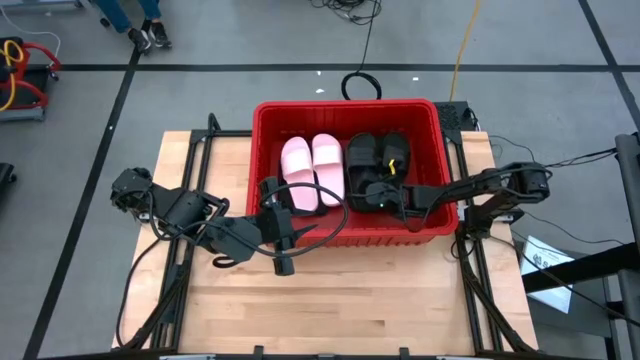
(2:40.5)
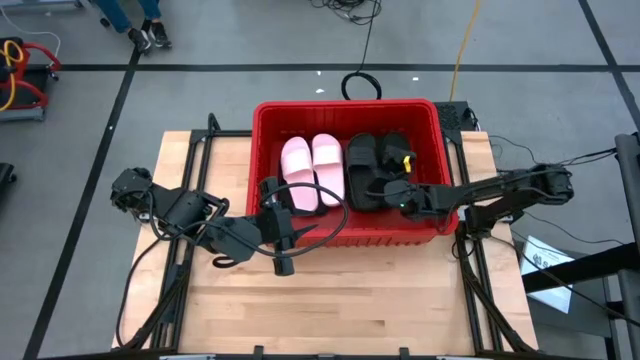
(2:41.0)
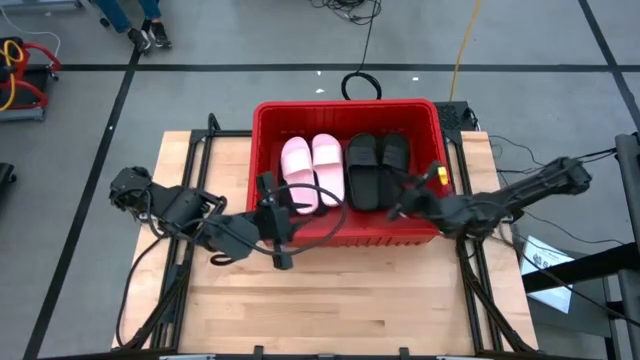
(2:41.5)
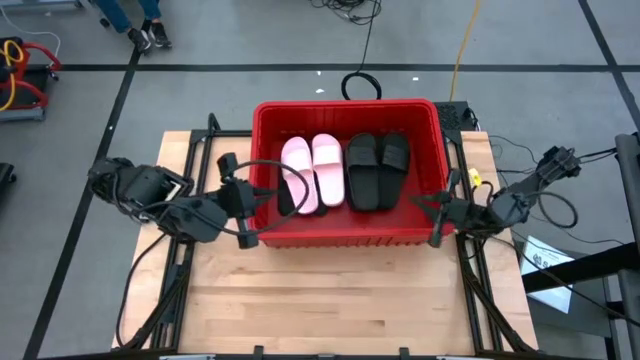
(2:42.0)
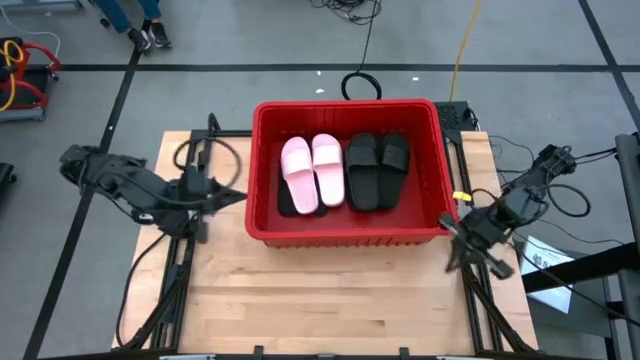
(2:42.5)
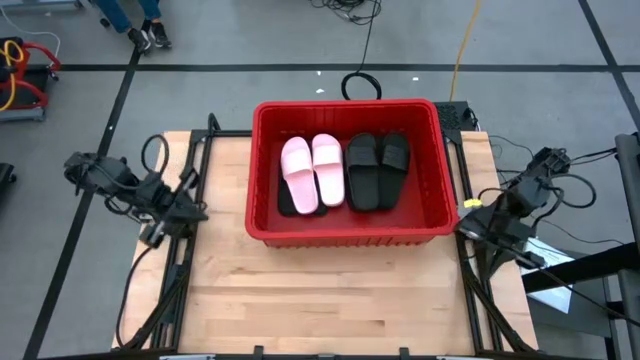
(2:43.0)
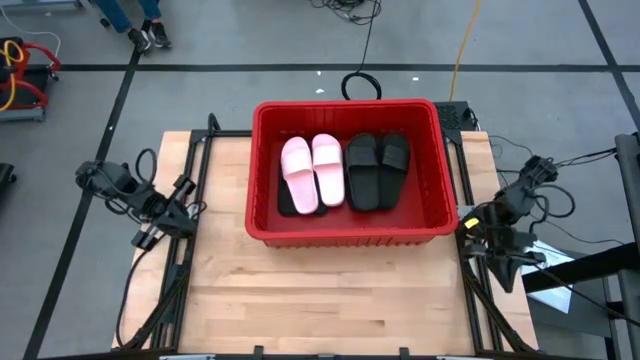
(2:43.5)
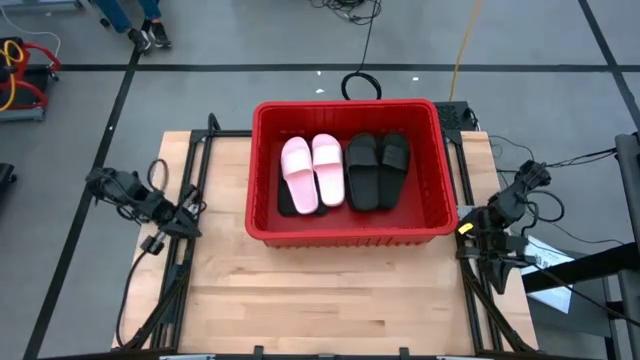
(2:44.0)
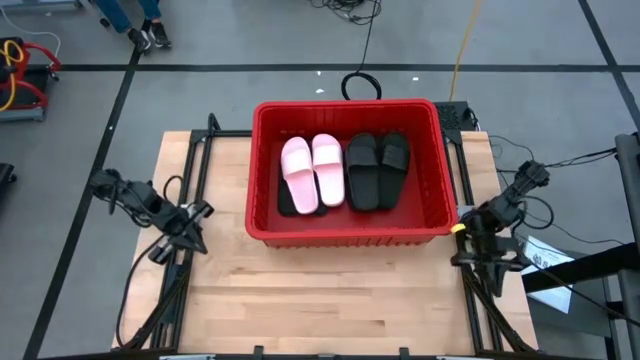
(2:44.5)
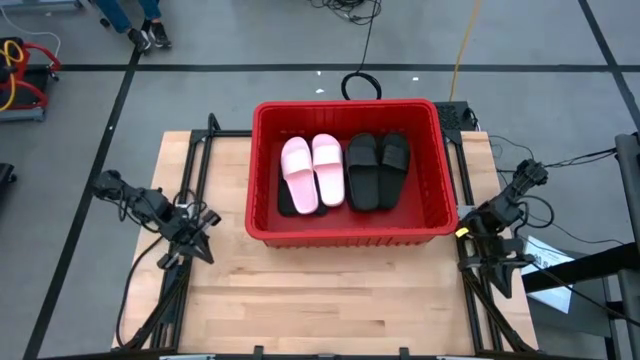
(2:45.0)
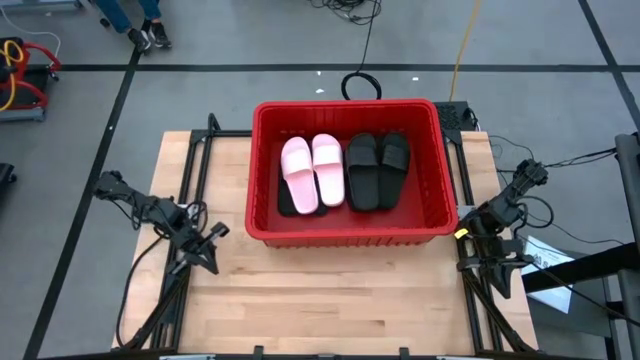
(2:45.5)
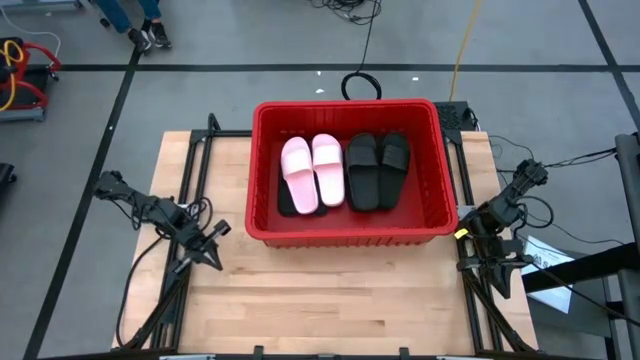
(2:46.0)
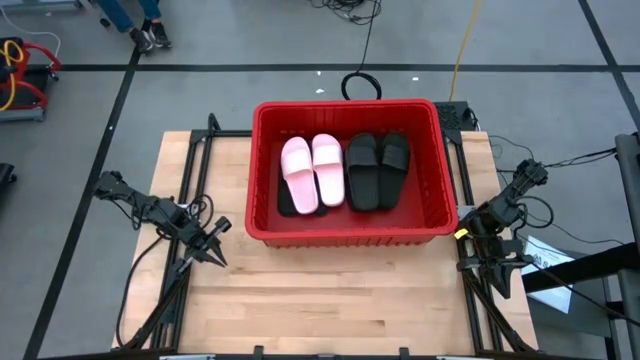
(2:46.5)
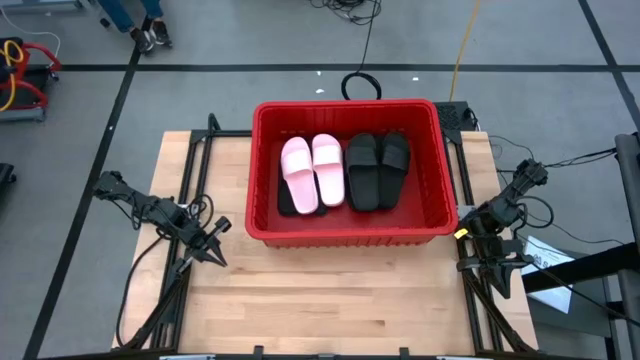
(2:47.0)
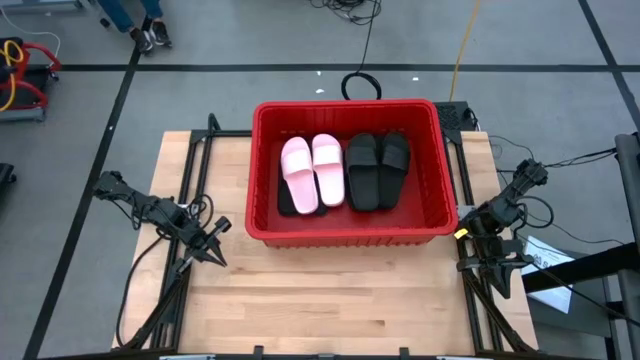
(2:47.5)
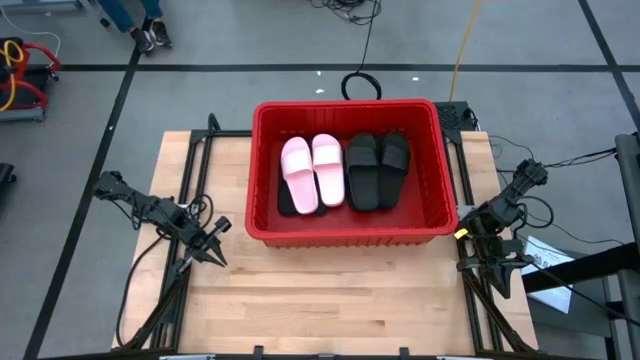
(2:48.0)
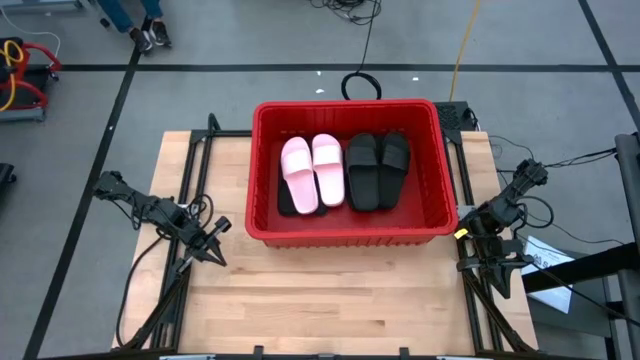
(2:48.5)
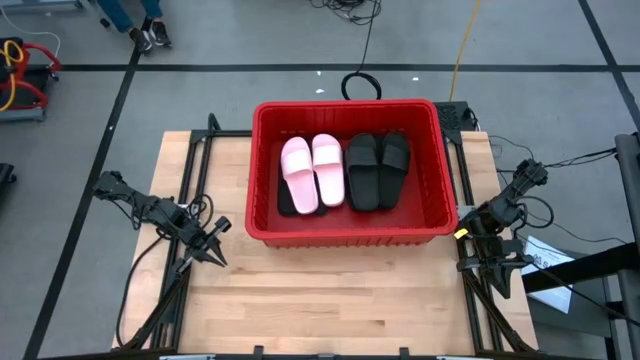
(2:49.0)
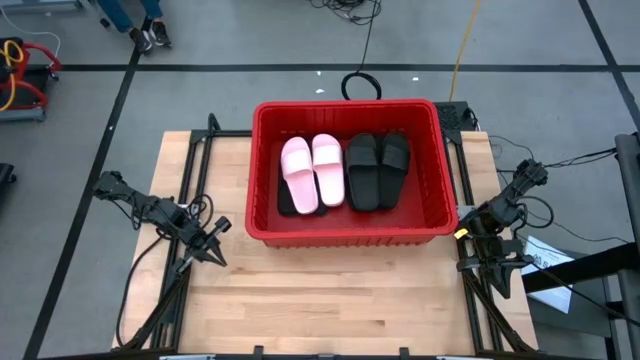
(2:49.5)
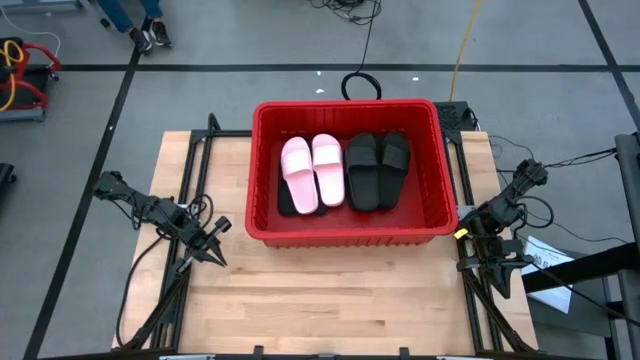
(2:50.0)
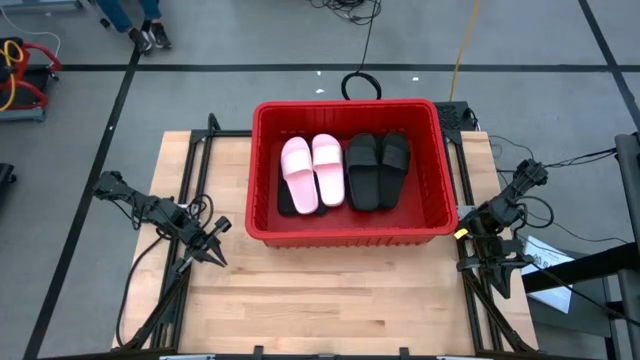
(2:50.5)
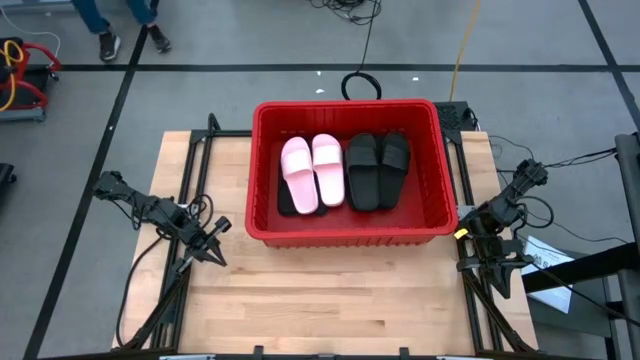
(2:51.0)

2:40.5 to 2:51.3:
Task: Pick and place slides into bin
Return to Home Position

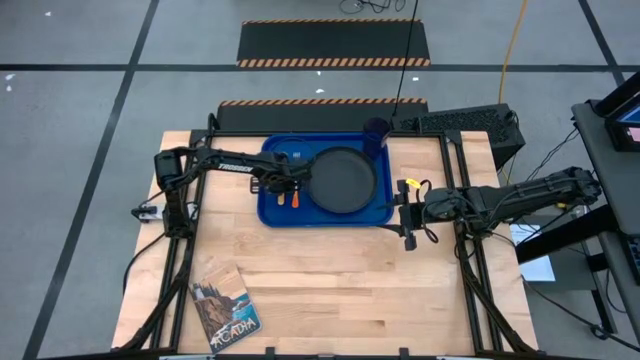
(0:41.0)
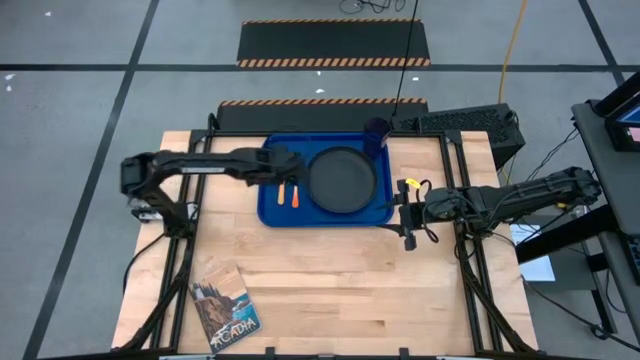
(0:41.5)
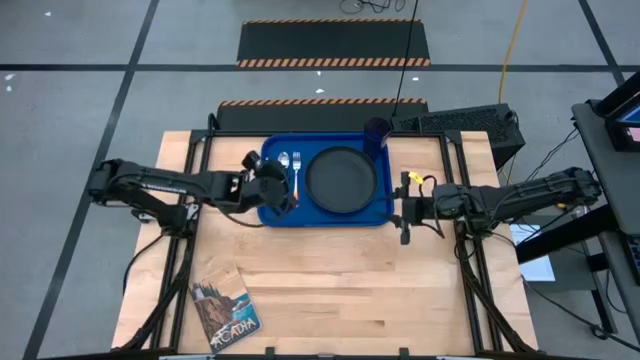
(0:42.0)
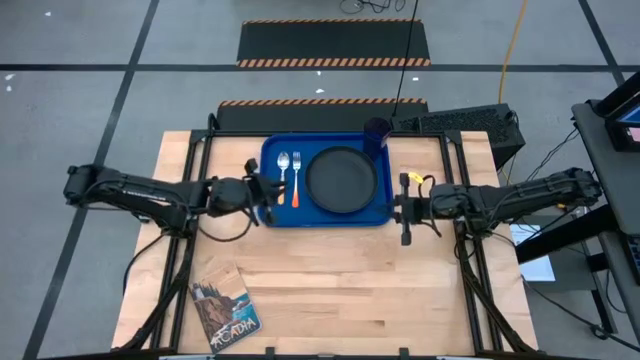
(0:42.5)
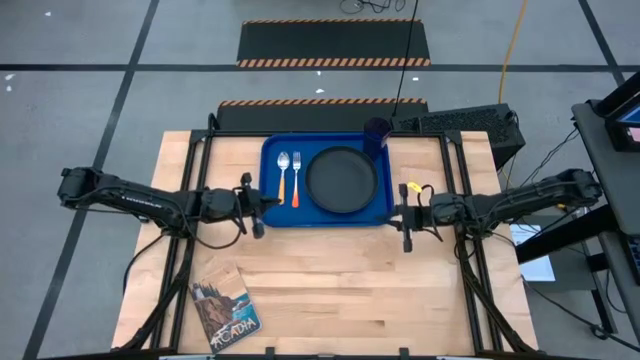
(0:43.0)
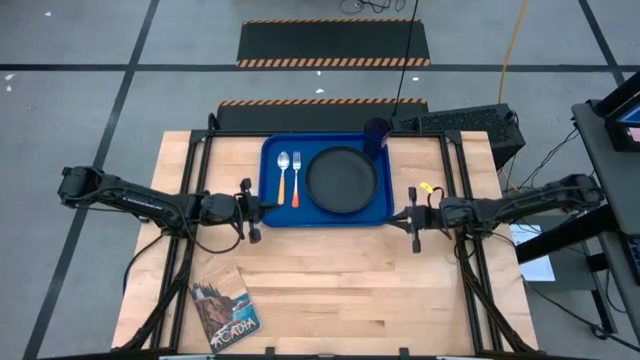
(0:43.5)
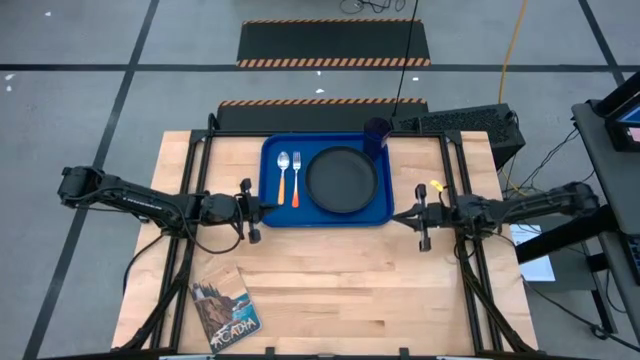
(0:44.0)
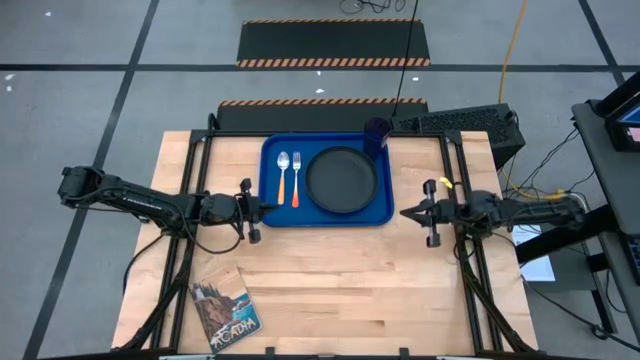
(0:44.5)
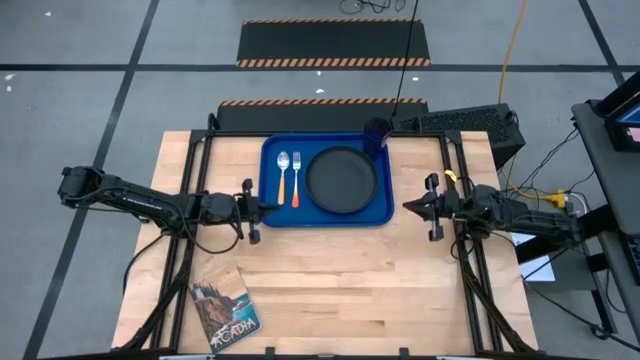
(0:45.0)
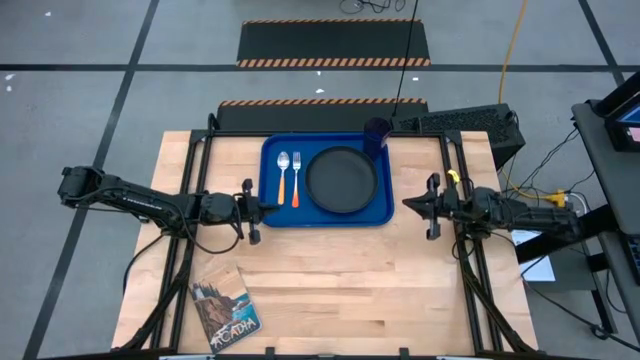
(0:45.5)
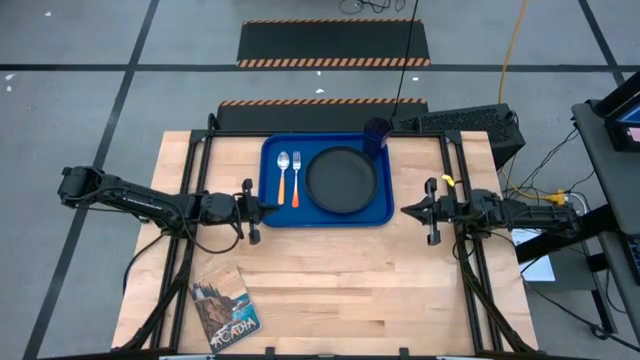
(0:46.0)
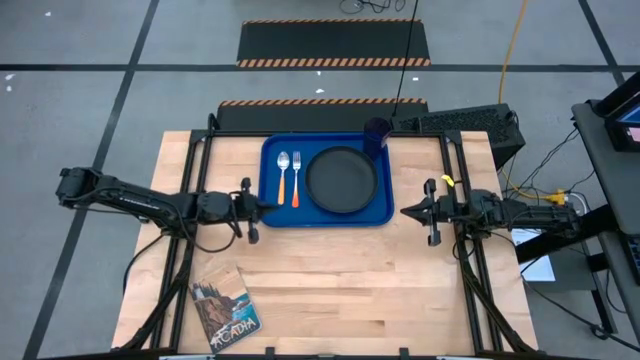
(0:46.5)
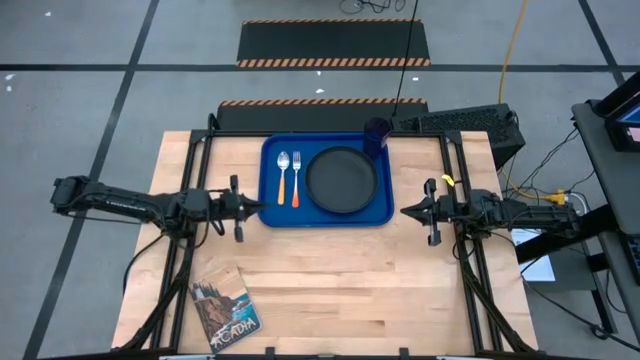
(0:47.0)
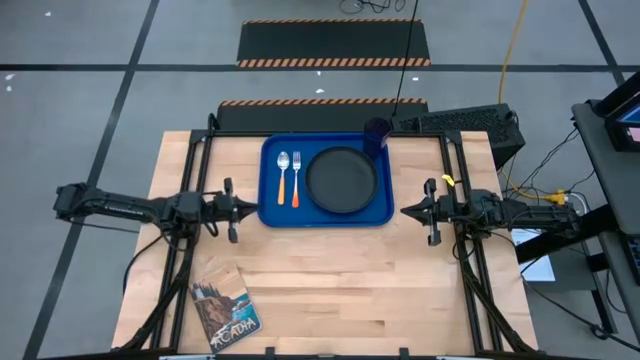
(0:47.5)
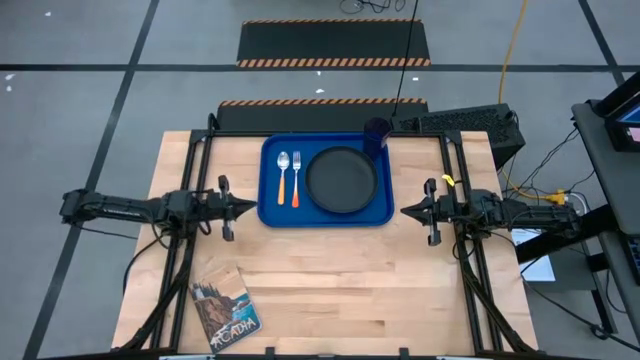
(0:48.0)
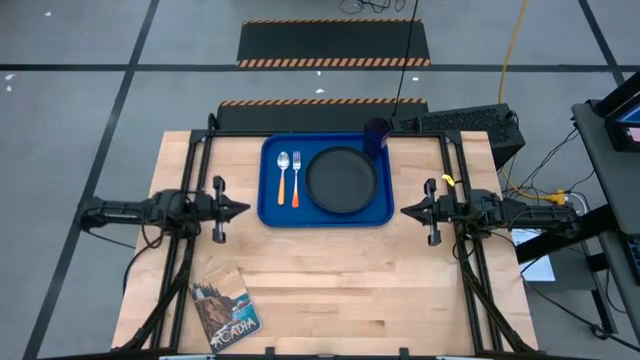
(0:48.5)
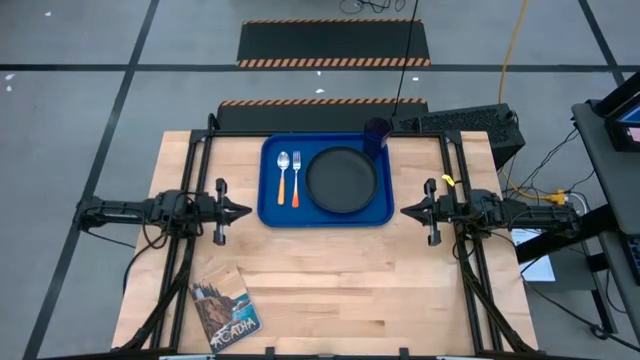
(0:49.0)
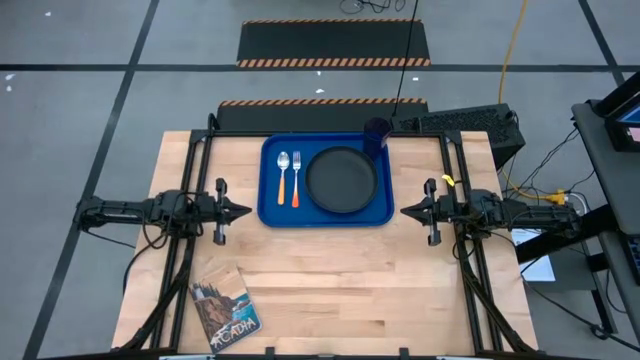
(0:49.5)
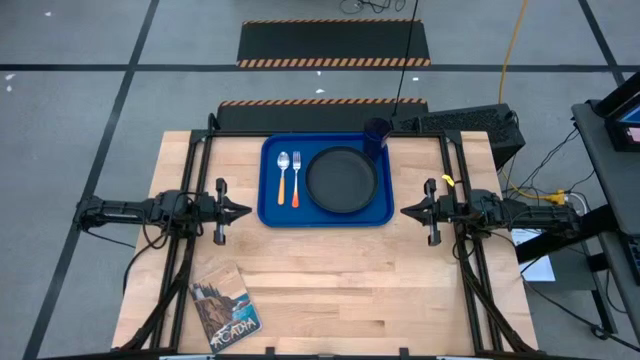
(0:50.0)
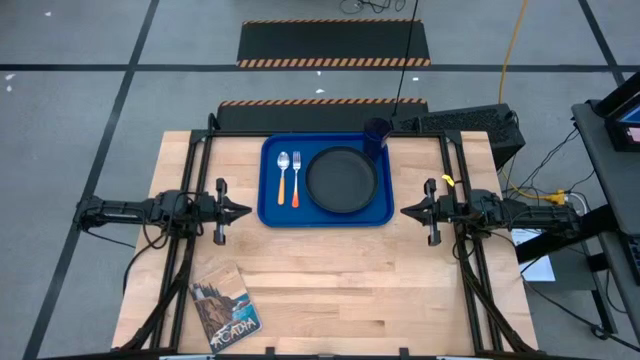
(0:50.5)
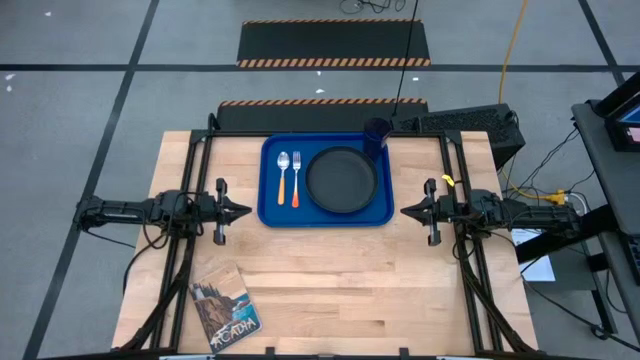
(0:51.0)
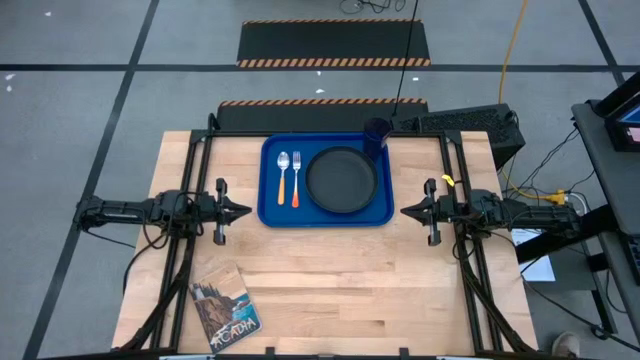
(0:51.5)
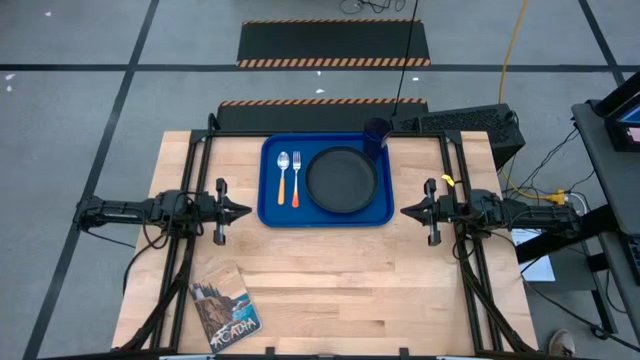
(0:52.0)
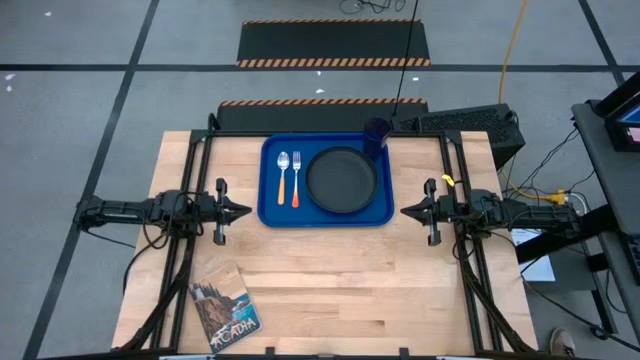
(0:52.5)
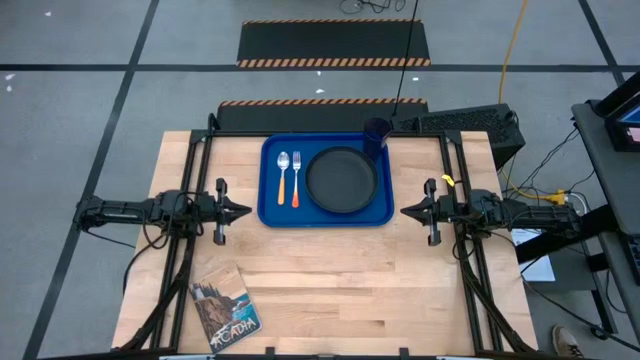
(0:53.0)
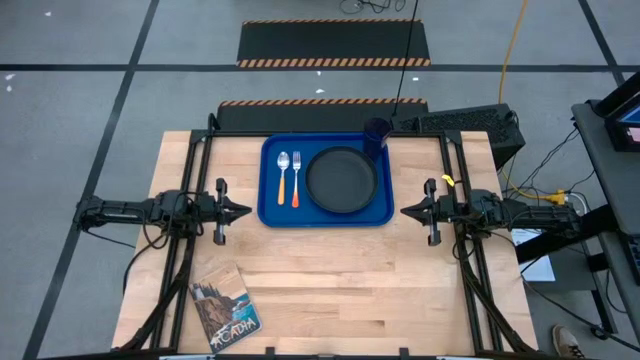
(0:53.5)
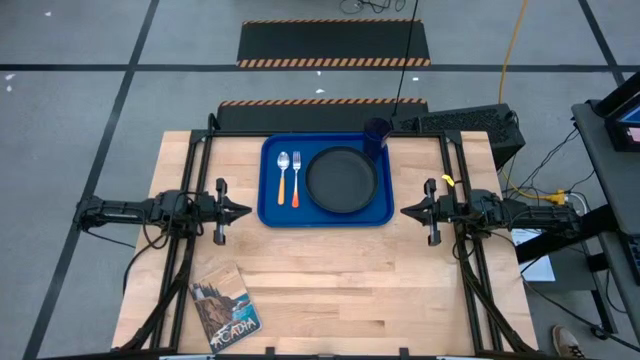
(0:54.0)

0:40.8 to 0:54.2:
Task: Pick and place plate/cup/fork/spoon on tray
Return to Home Position
